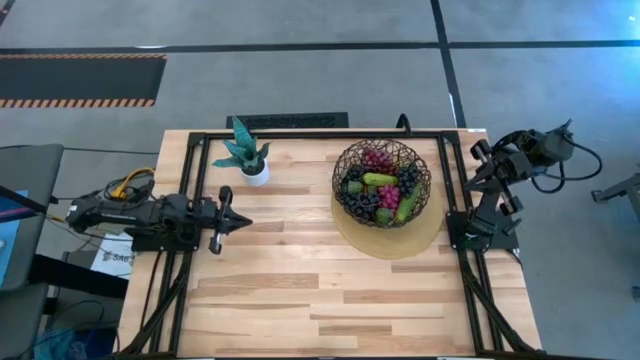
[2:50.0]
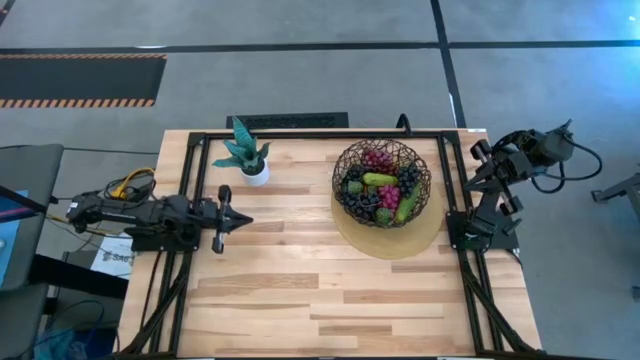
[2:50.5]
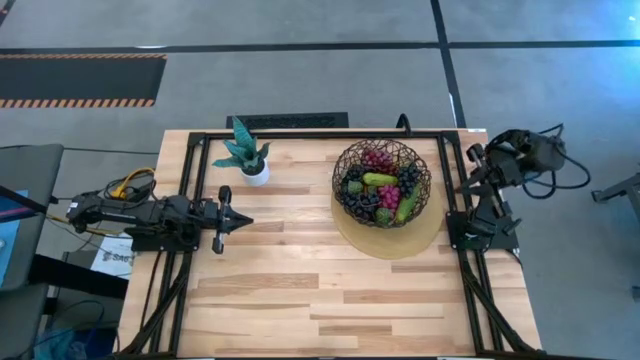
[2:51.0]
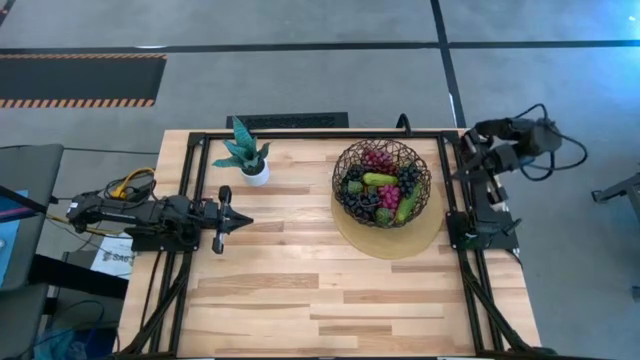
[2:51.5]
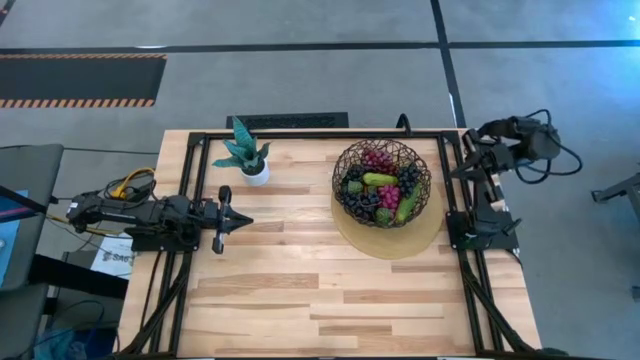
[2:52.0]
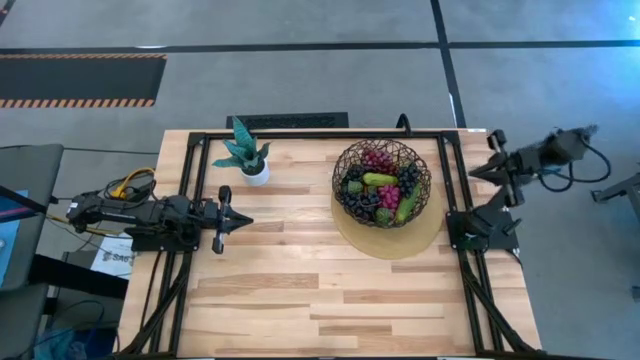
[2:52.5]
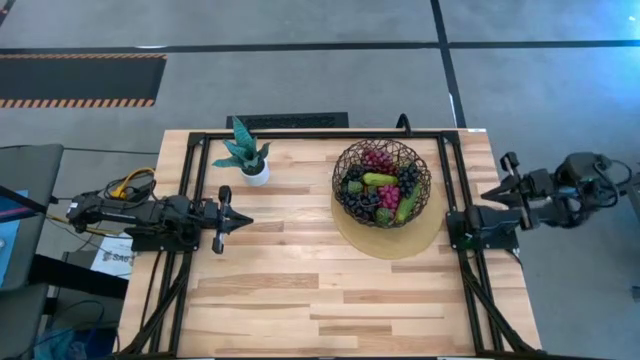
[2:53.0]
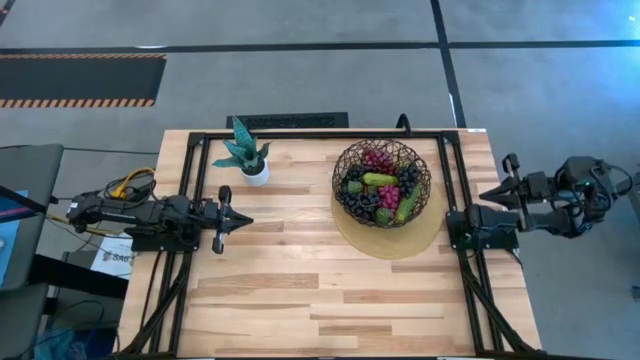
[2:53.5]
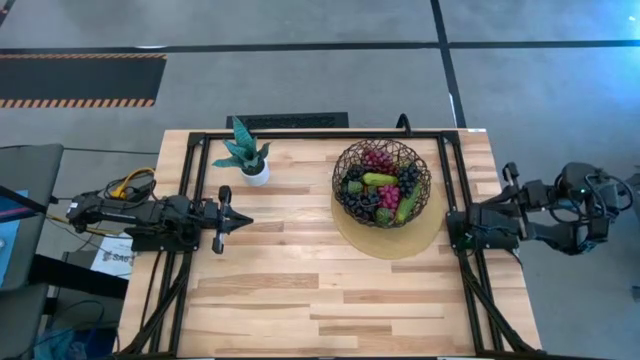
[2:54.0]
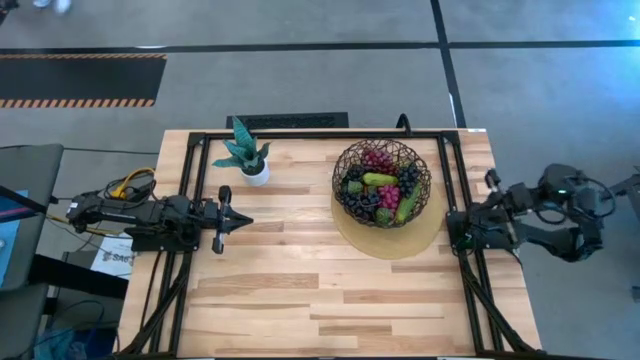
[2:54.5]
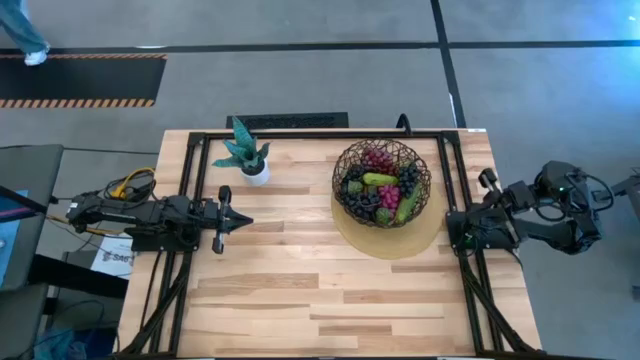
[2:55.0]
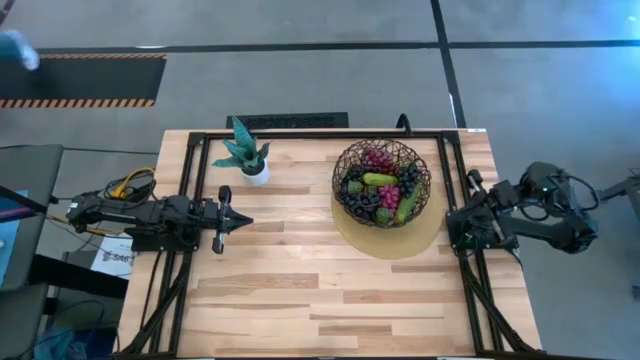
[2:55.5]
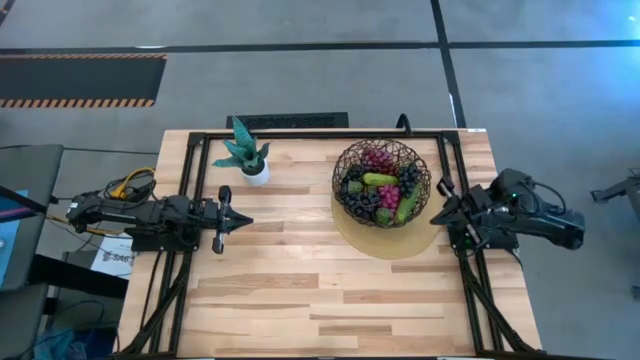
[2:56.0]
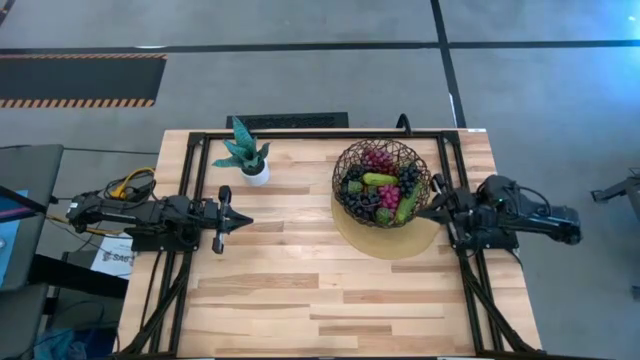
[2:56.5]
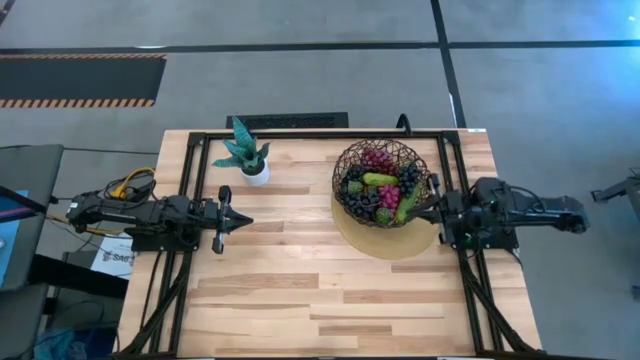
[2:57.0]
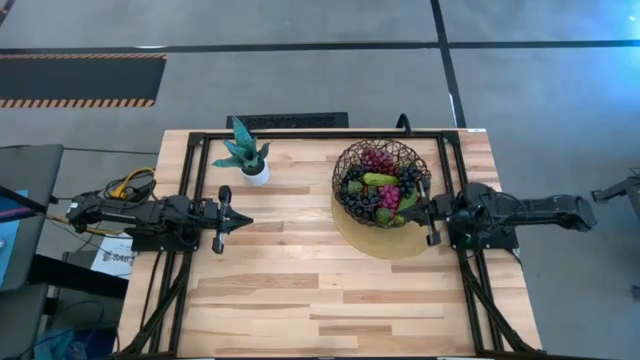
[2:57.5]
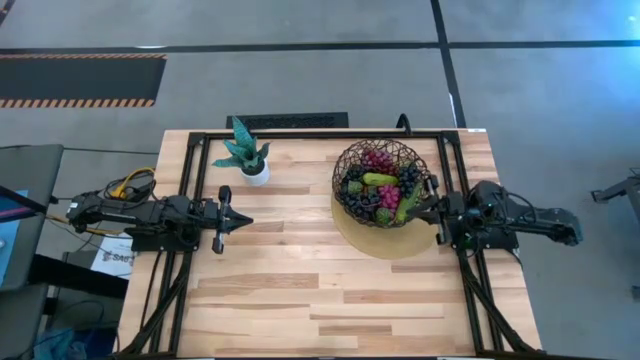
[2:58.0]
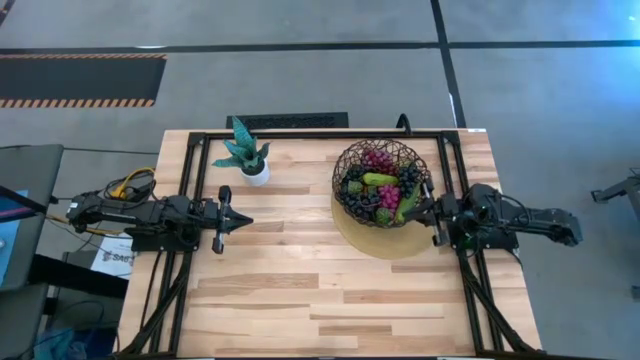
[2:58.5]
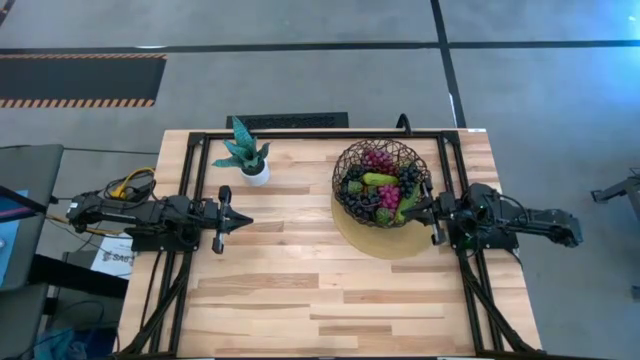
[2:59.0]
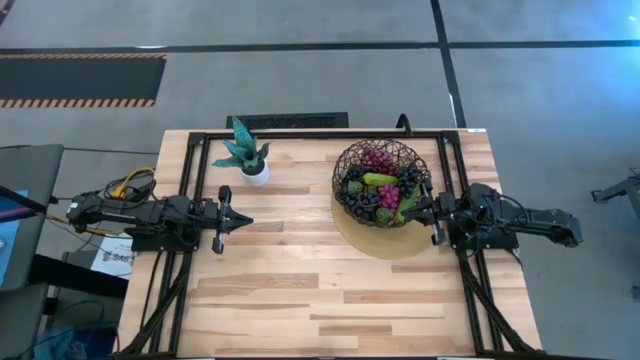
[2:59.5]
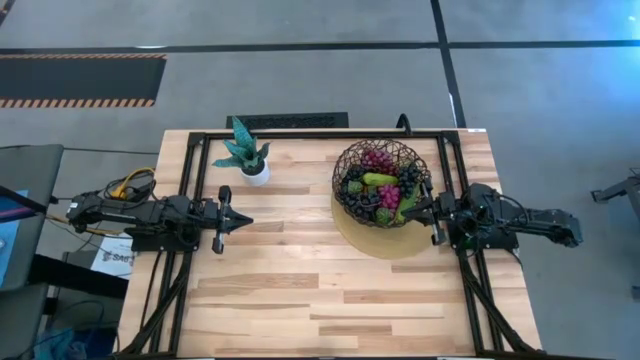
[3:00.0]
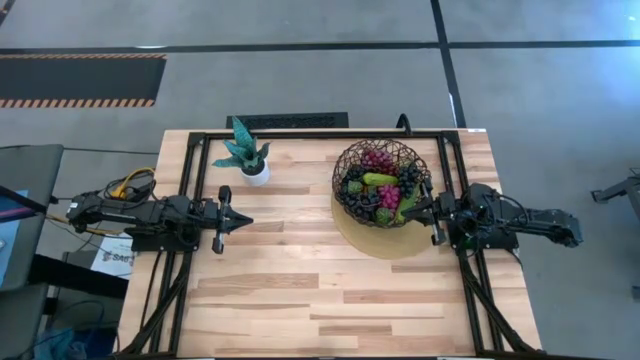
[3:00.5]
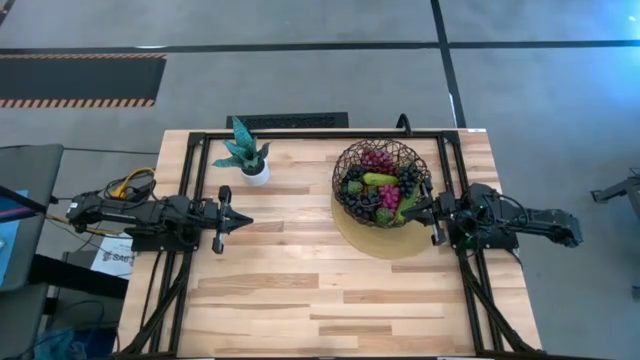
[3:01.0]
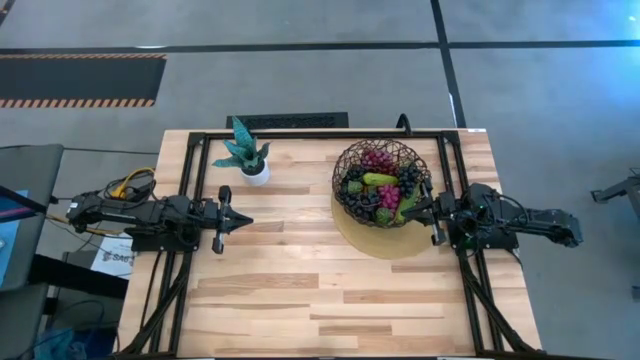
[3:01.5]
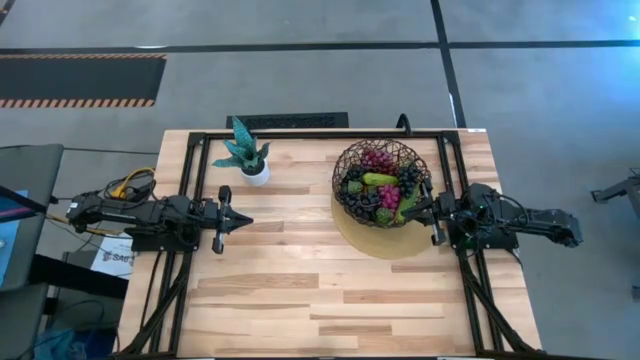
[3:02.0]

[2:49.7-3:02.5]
Task: Build produce basket
Return to Home Position

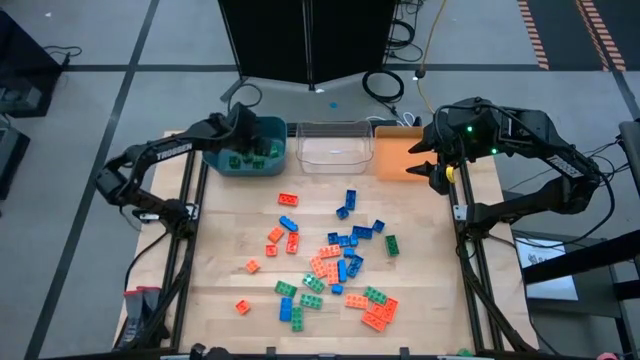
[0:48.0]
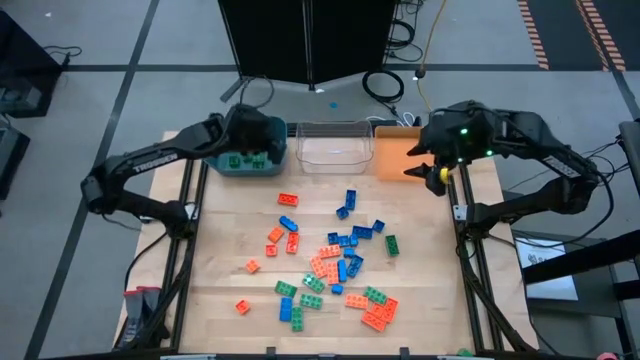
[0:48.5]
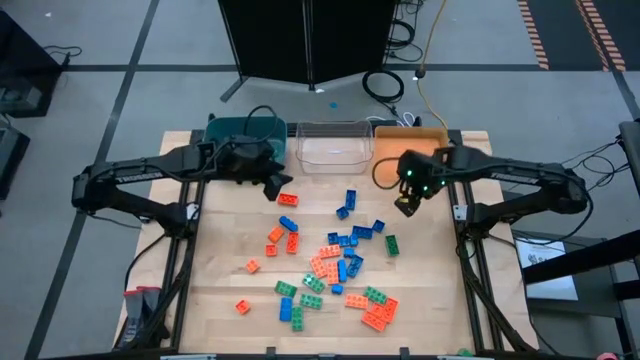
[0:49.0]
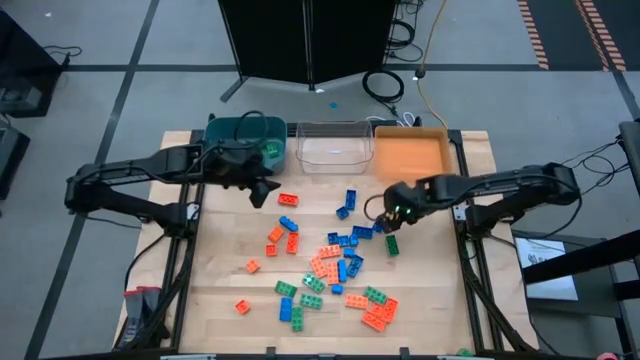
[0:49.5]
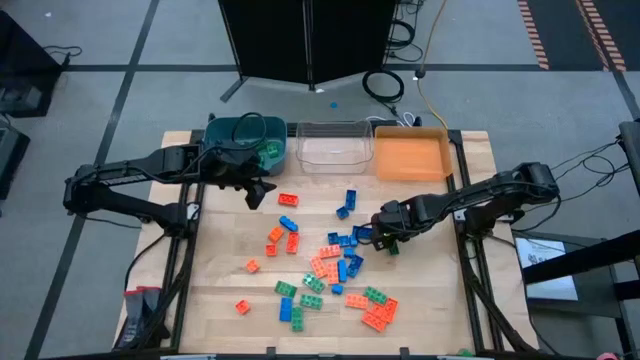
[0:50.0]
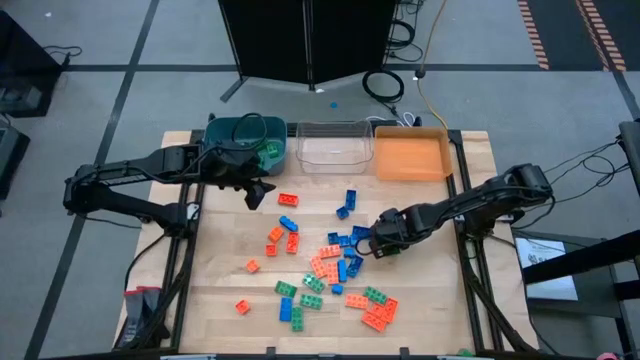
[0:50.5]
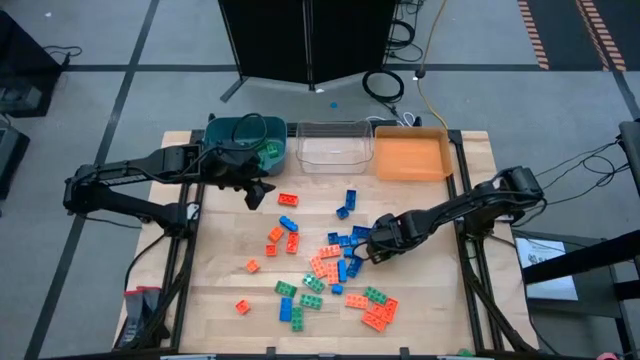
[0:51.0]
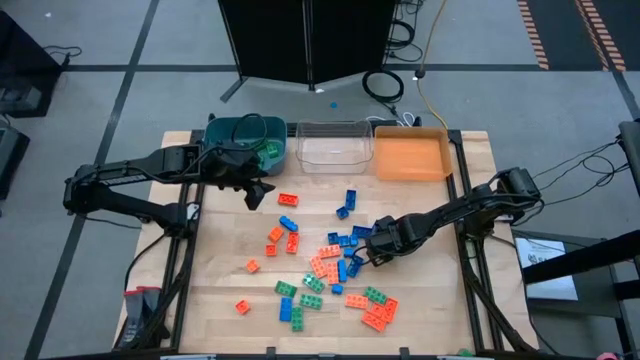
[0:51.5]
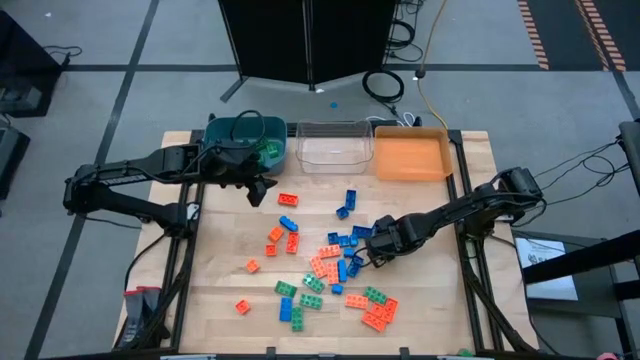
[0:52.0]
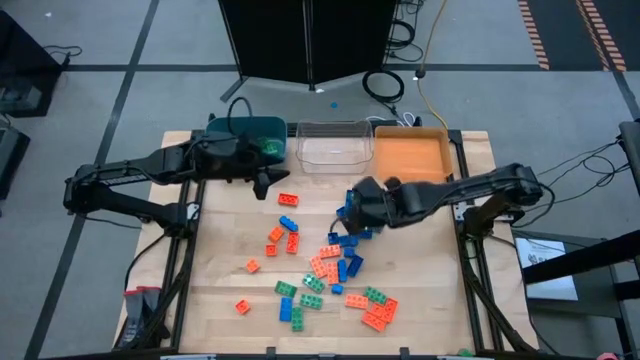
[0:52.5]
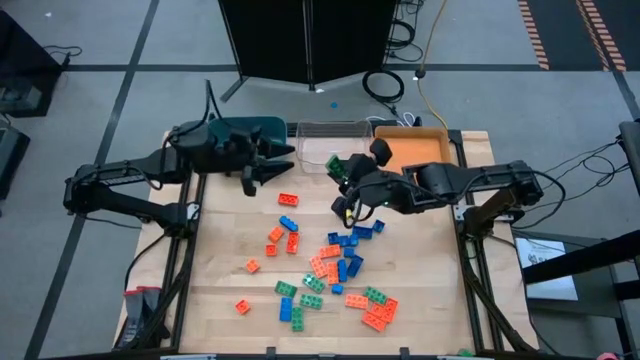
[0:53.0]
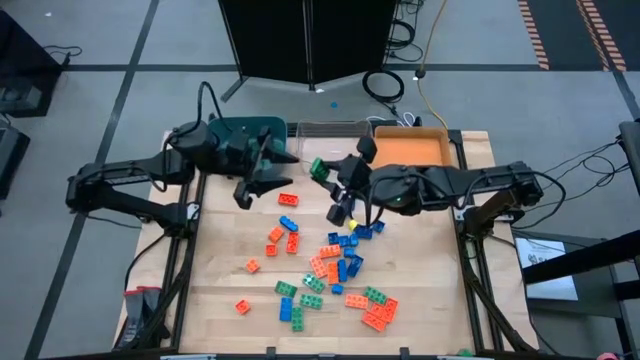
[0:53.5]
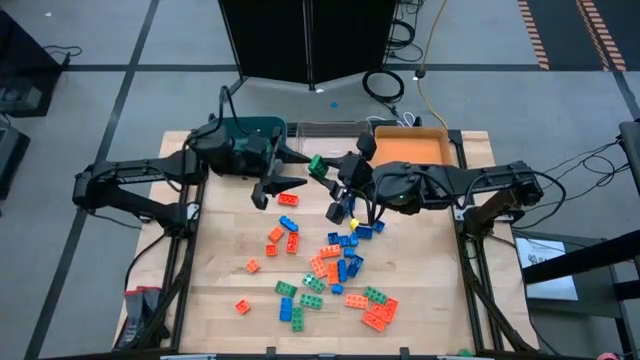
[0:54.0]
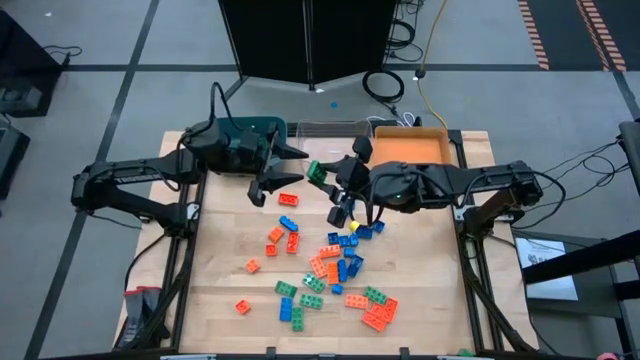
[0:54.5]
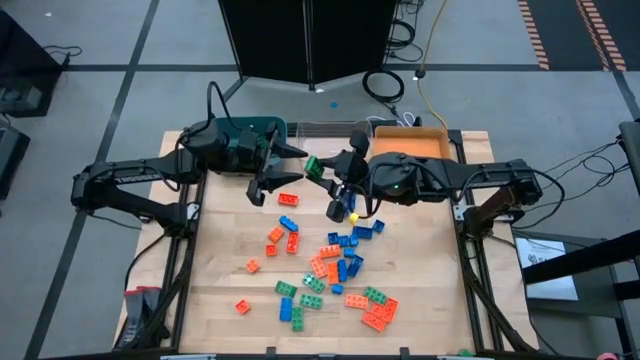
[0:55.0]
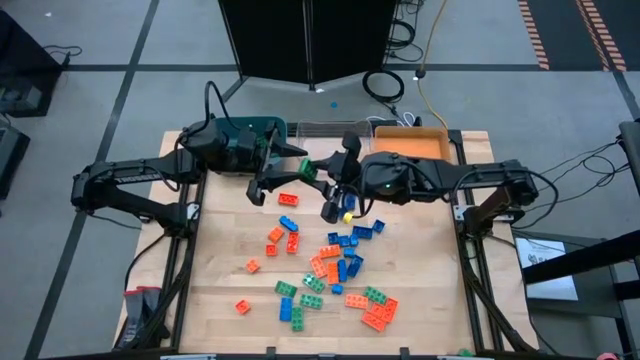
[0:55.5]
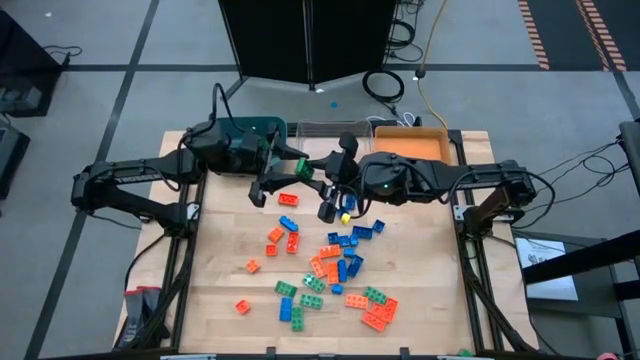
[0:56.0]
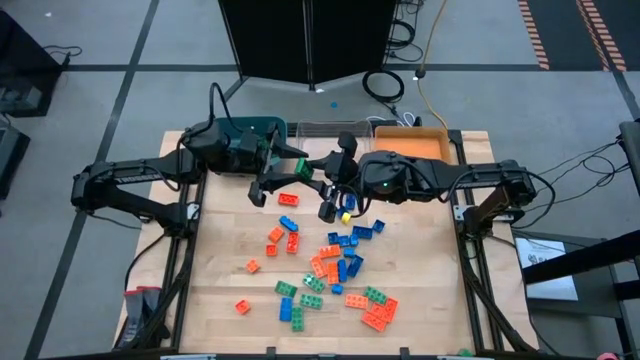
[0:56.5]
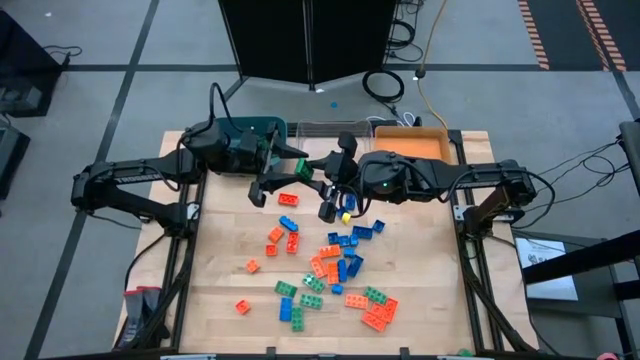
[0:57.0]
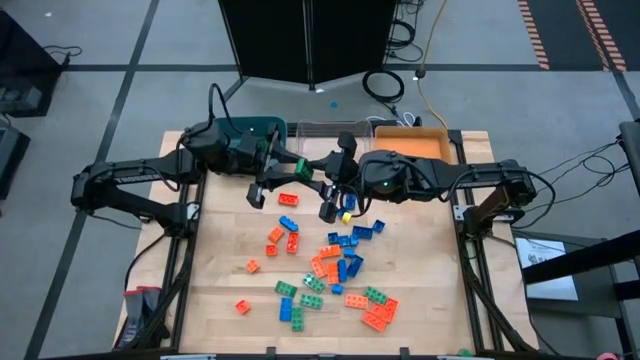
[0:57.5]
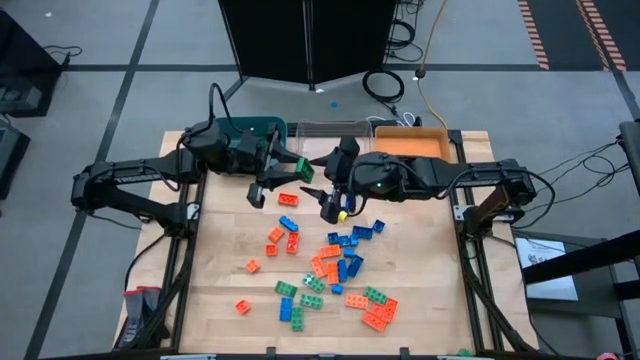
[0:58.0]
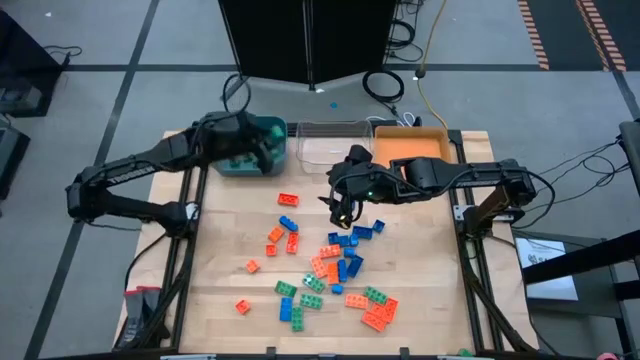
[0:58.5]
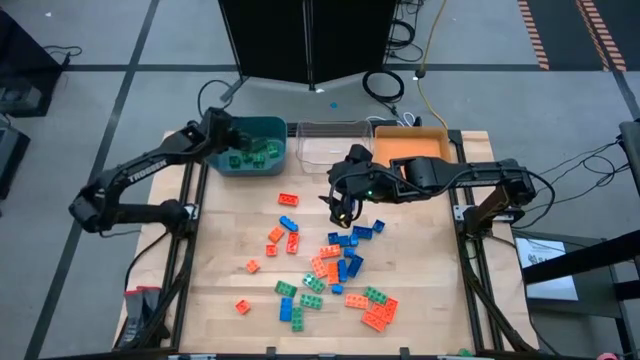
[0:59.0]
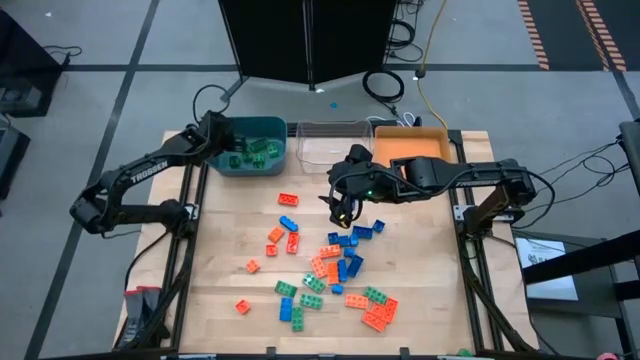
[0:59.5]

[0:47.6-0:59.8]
Task: Sort blocks
Put the green game piece into the blue bin
